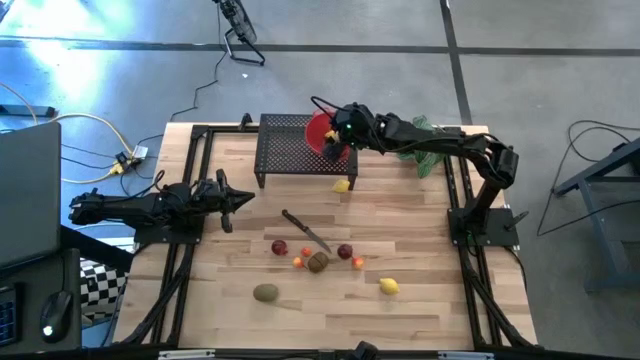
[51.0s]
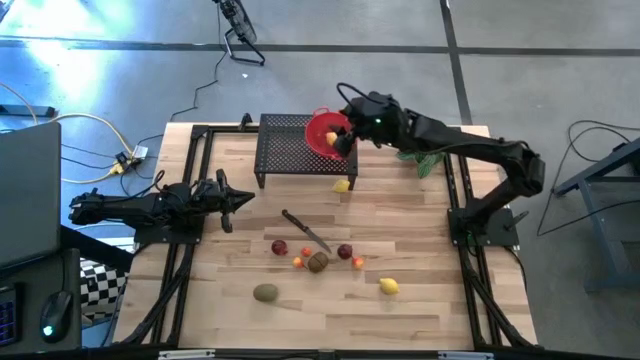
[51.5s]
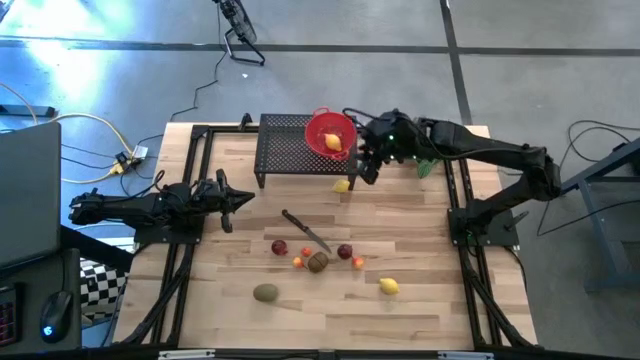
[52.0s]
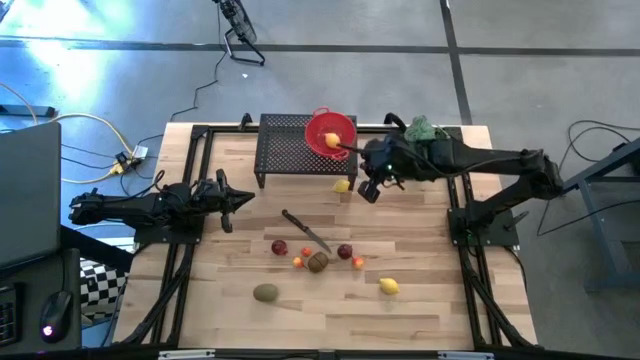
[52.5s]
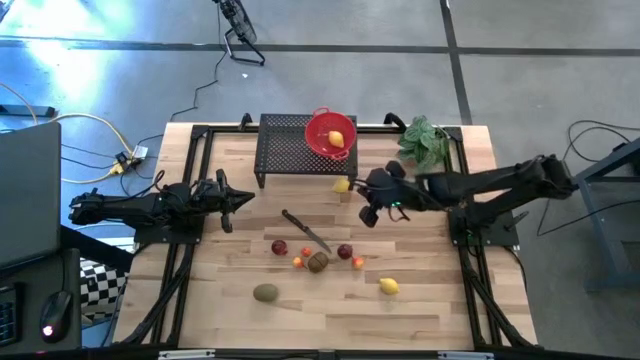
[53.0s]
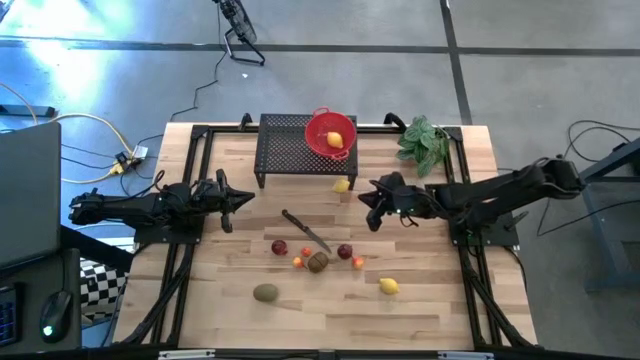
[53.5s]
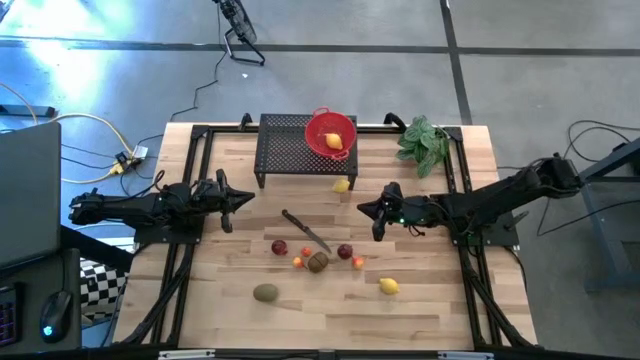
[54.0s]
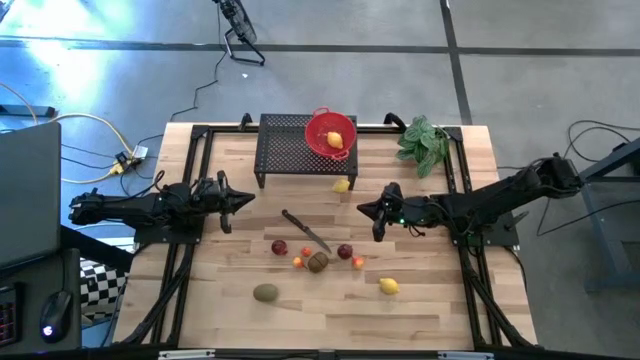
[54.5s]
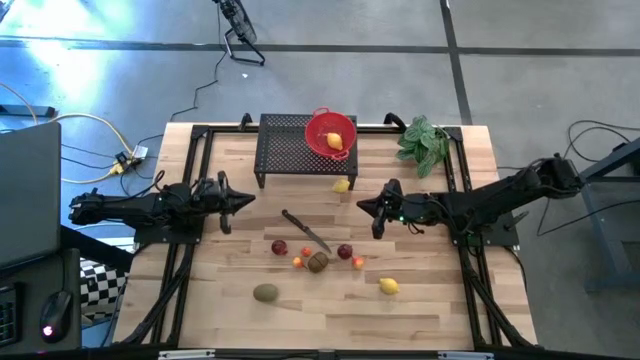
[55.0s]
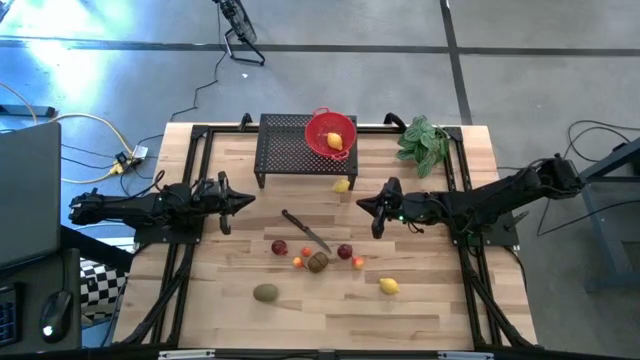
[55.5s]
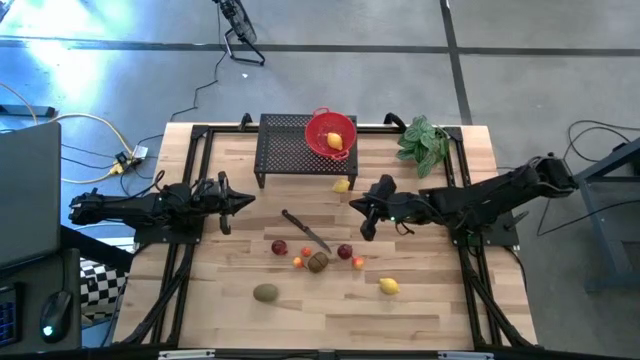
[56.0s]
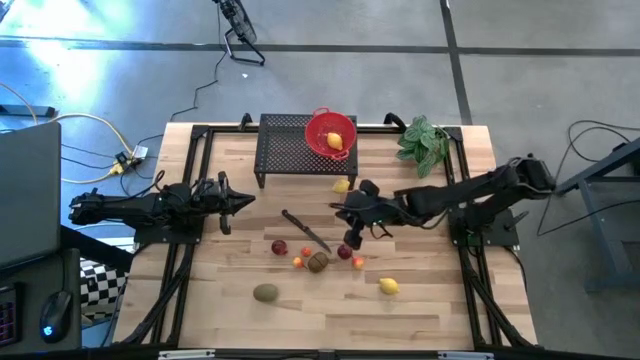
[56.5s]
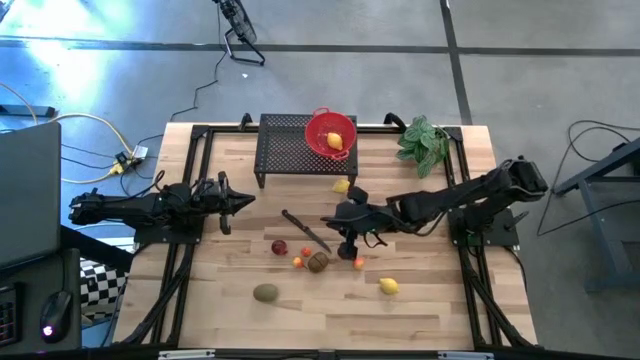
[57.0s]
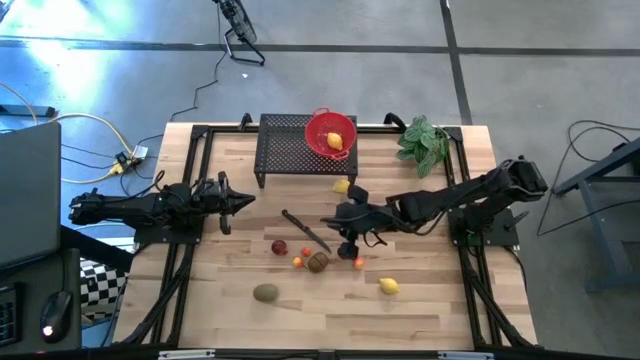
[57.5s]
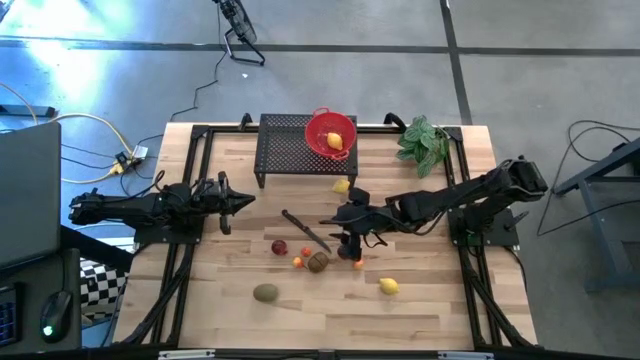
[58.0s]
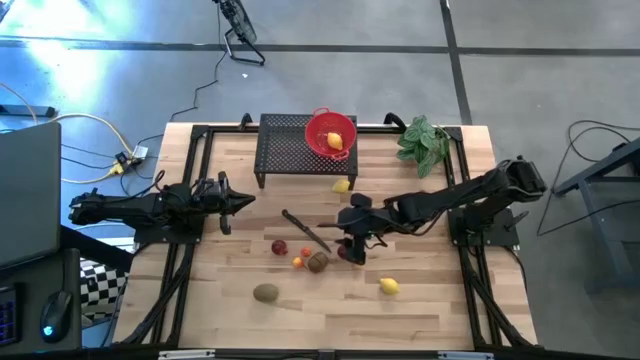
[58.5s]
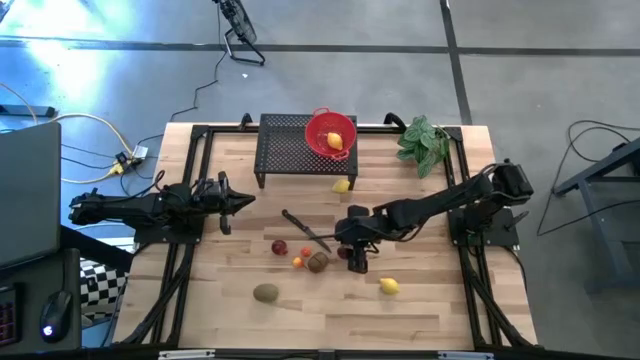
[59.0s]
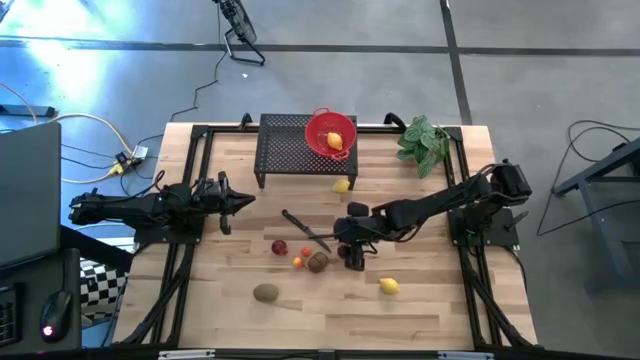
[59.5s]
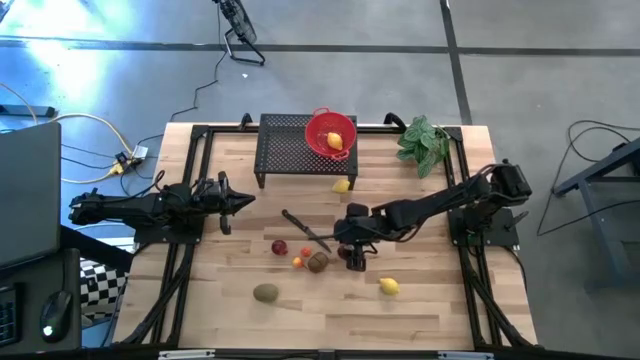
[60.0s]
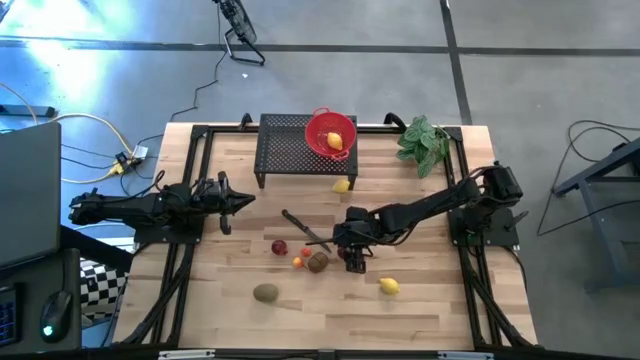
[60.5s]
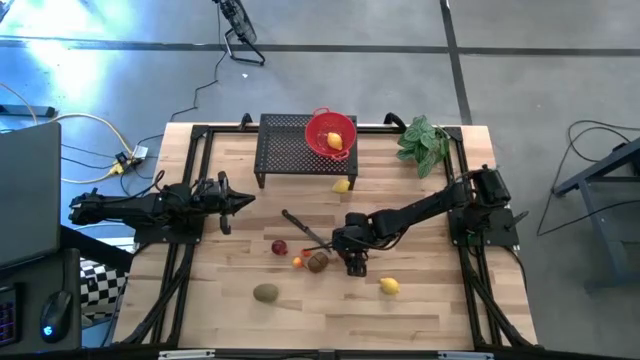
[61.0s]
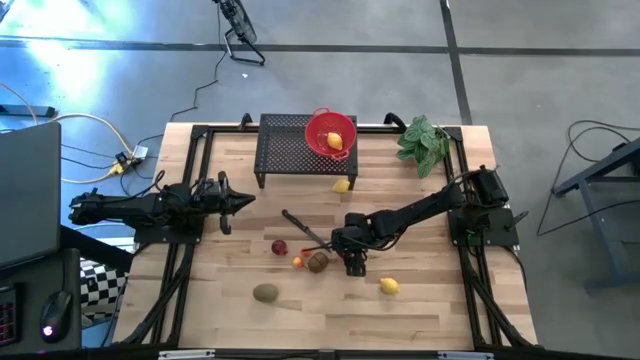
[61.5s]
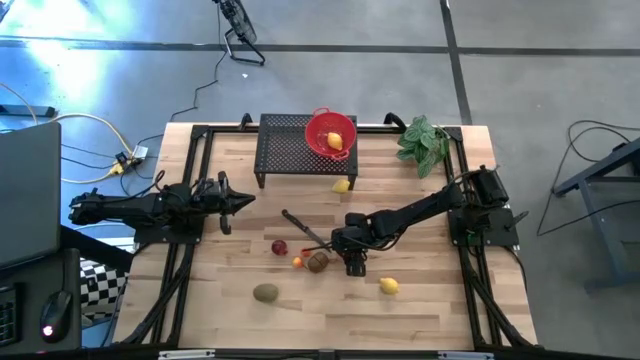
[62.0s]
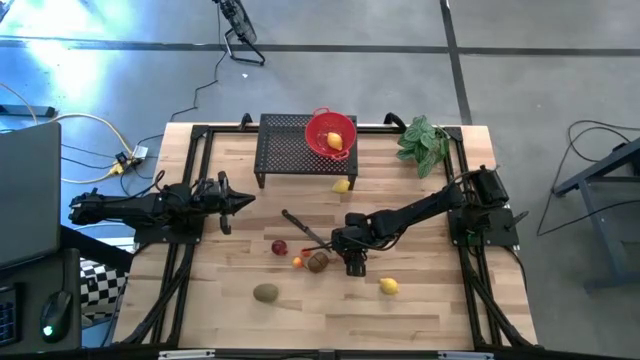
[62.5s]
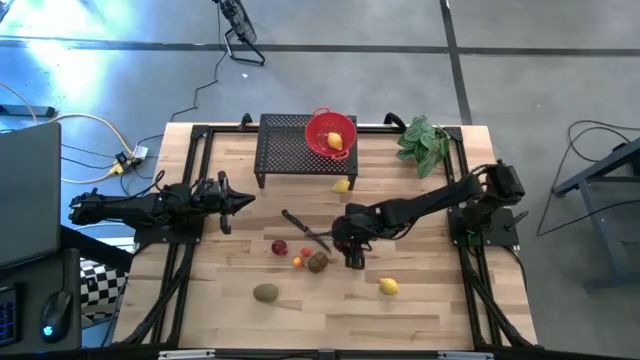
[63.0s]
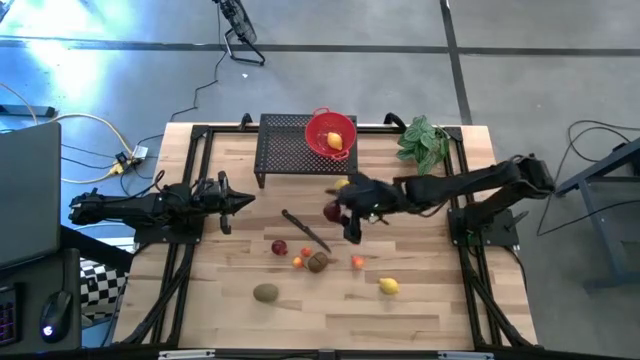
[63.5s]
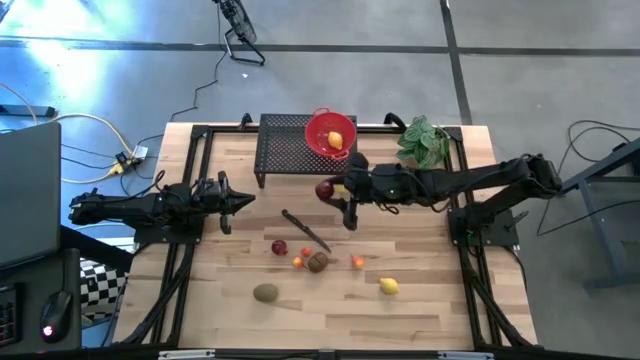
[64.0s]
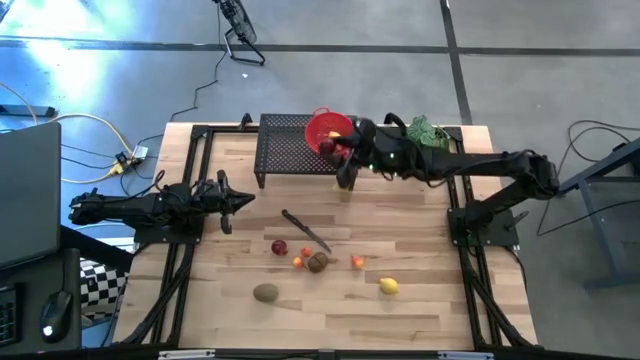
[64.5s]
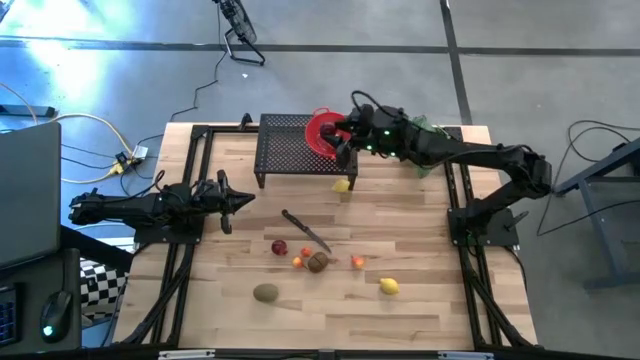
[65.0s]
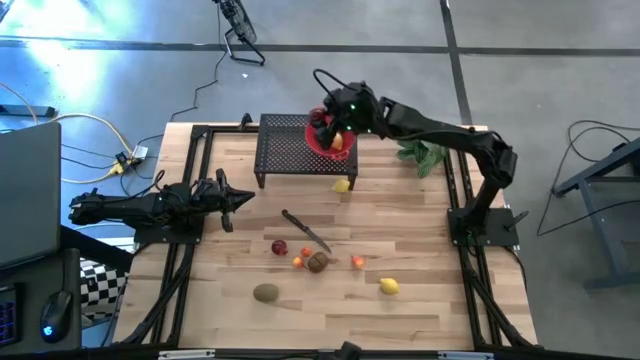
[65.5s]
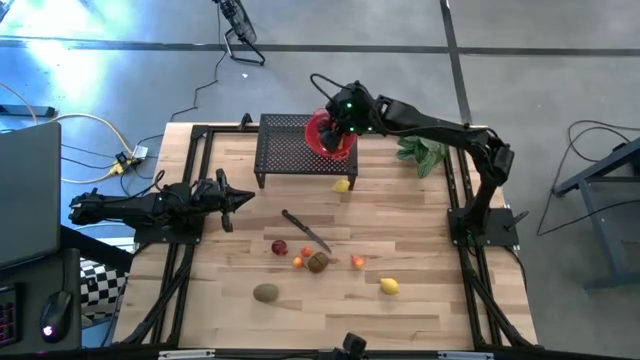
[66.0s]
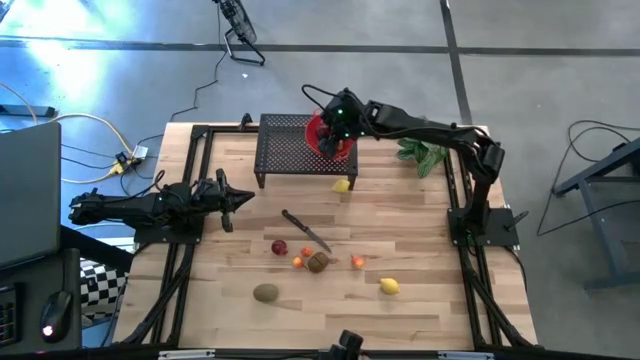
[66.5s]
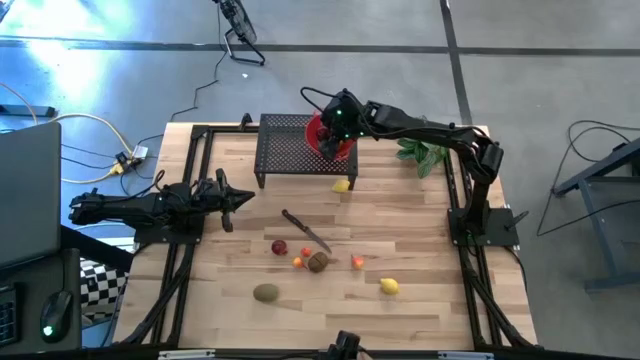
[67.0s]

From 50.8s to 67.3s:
Task: Pick & Place Fruit
Put the right pomegranate into the colander on the shelf

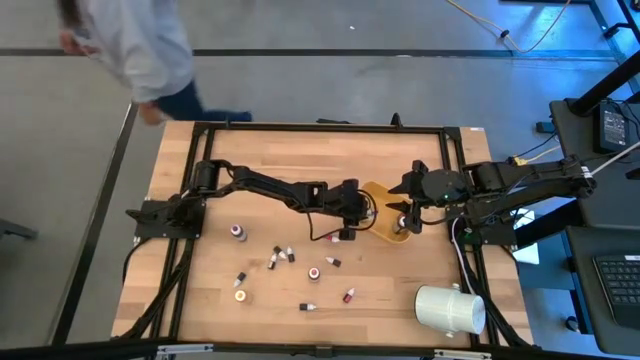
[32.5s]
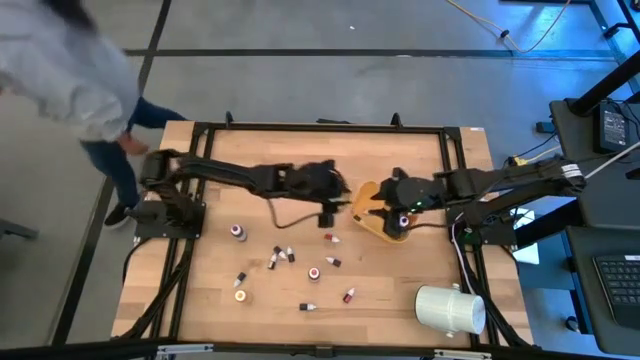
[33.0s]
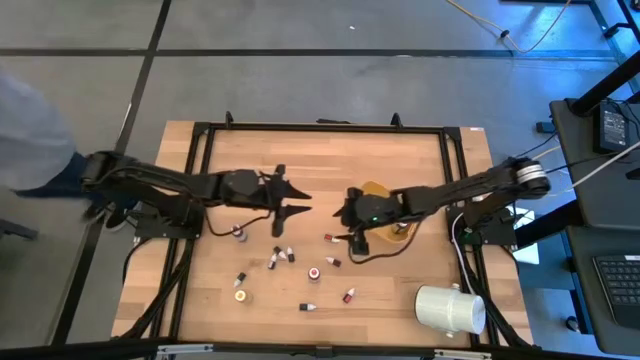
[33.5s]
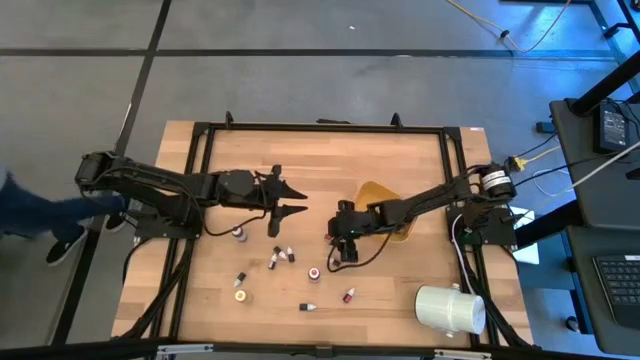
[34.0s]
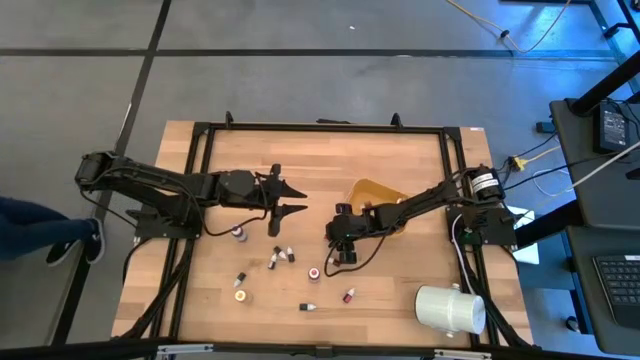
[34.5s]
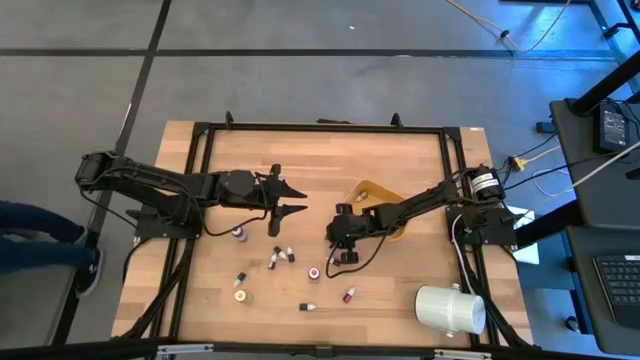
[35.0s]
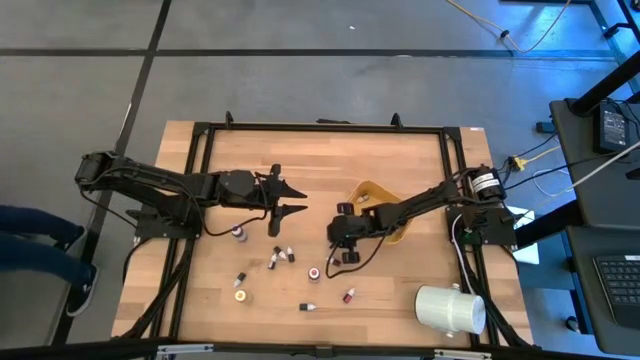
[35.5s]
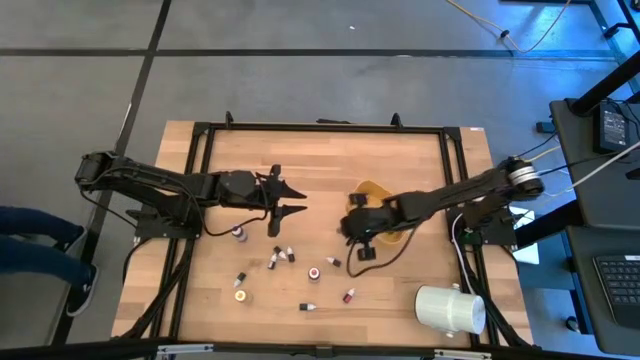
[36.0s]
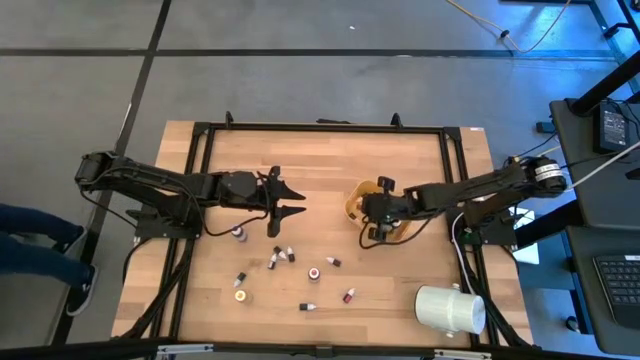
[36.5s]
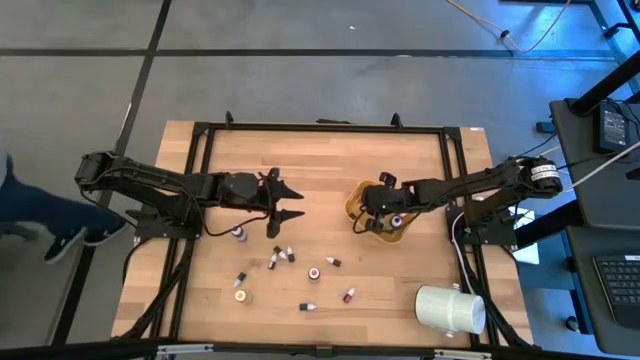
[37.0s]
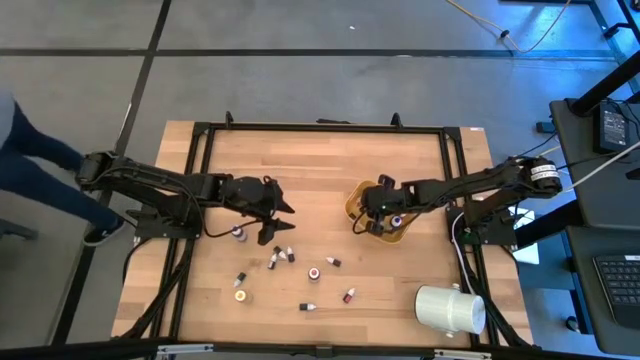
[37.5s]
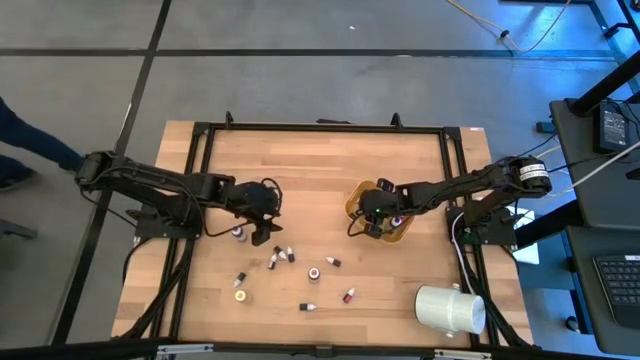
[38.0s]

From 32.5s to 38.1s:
Task: Pick & Place food coloring
Put the top small red food coloring bottle in the yellow bin
